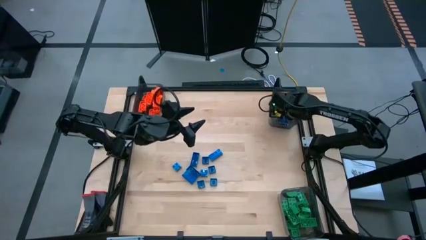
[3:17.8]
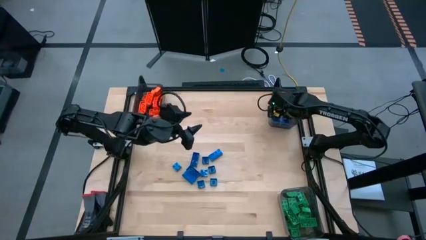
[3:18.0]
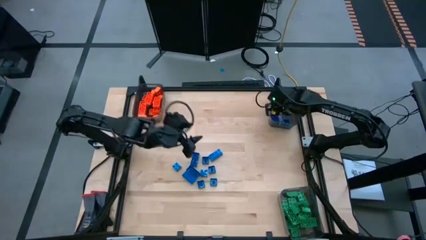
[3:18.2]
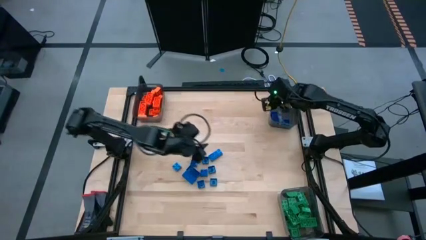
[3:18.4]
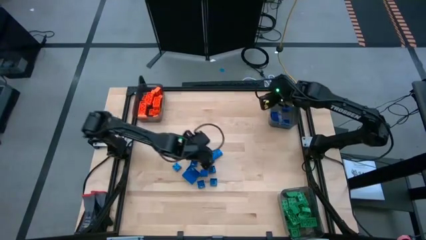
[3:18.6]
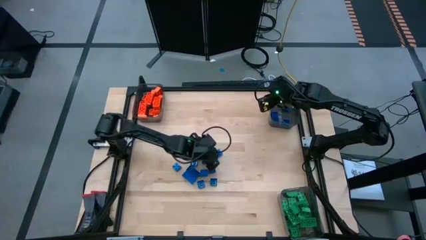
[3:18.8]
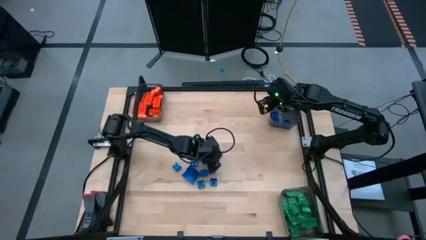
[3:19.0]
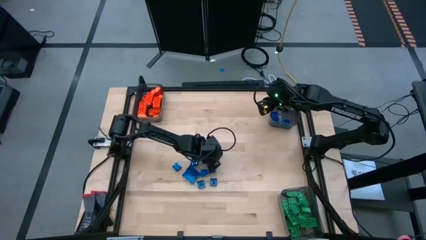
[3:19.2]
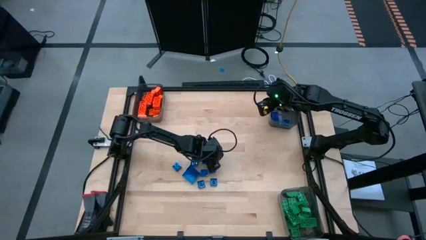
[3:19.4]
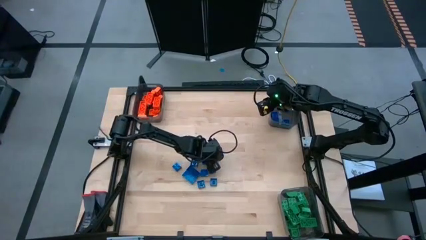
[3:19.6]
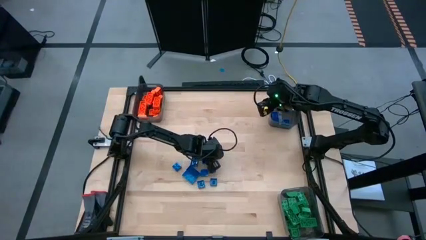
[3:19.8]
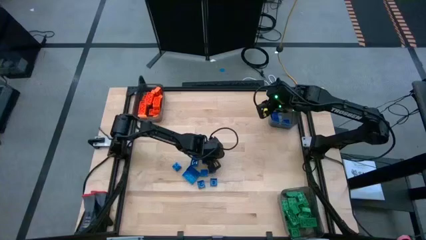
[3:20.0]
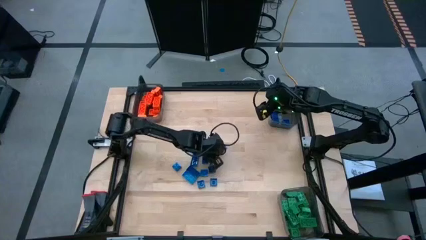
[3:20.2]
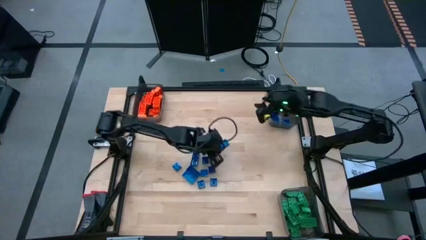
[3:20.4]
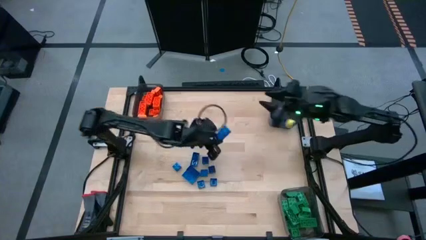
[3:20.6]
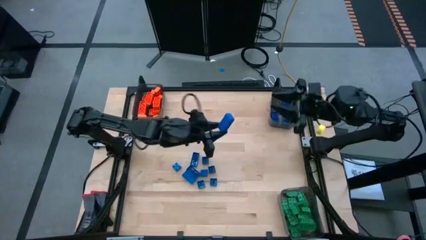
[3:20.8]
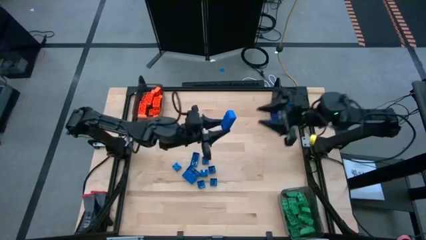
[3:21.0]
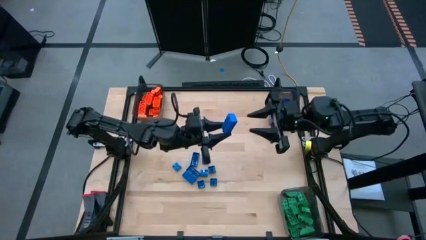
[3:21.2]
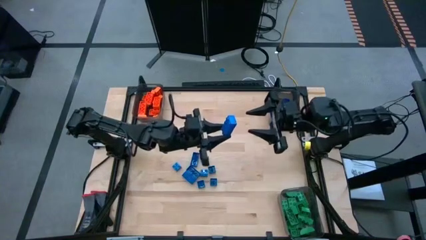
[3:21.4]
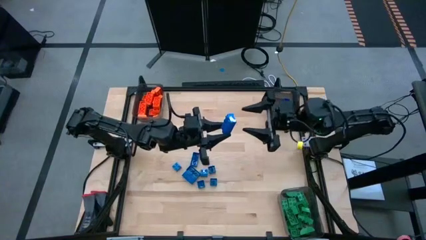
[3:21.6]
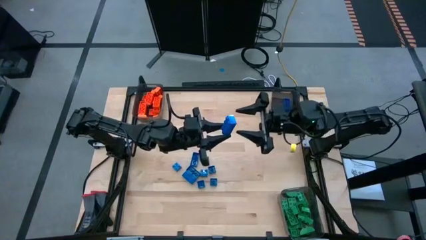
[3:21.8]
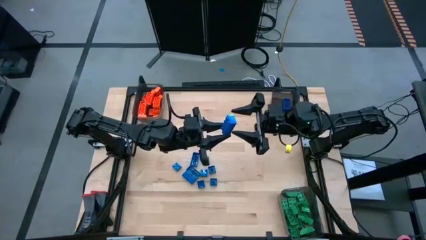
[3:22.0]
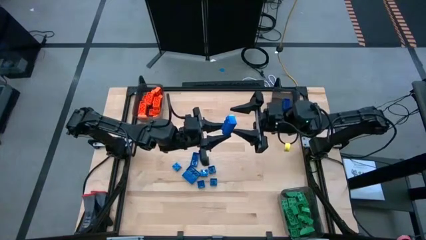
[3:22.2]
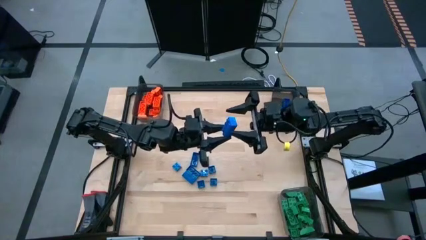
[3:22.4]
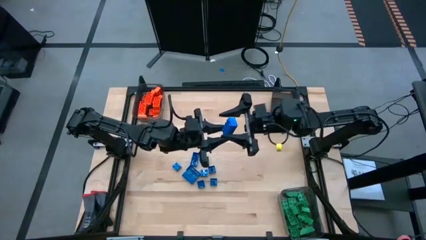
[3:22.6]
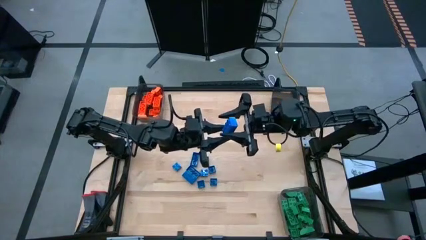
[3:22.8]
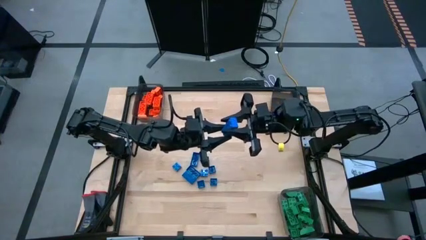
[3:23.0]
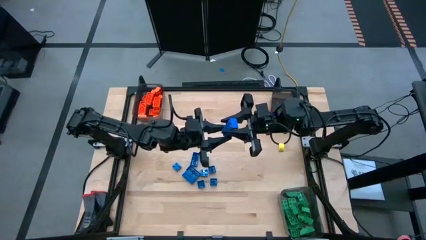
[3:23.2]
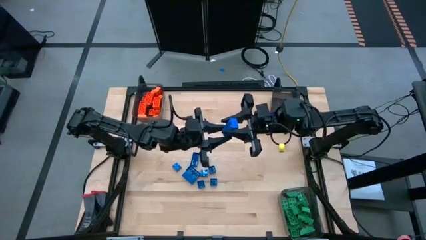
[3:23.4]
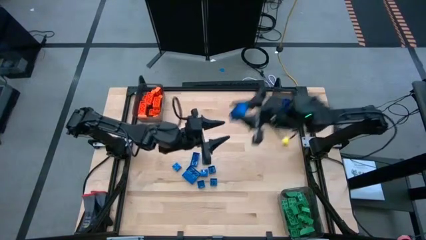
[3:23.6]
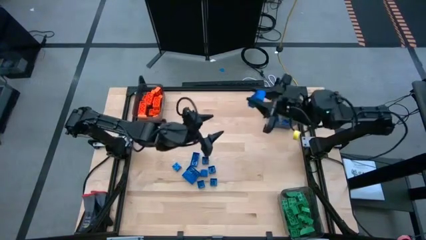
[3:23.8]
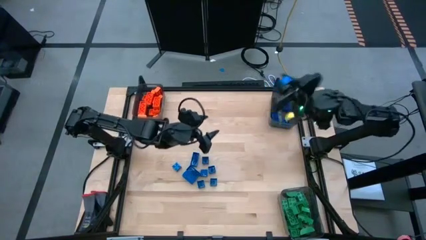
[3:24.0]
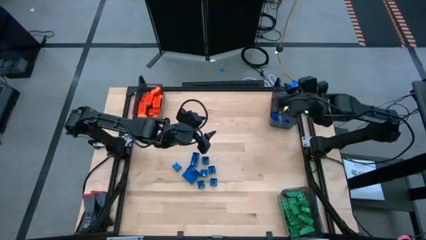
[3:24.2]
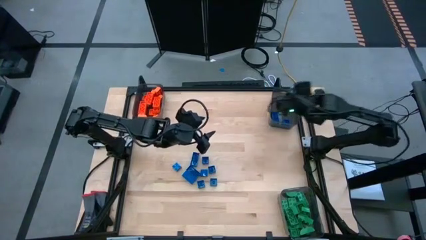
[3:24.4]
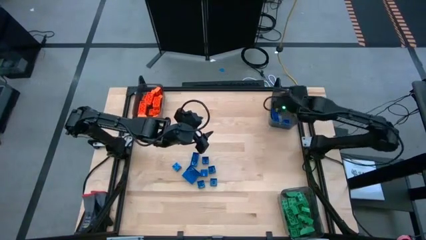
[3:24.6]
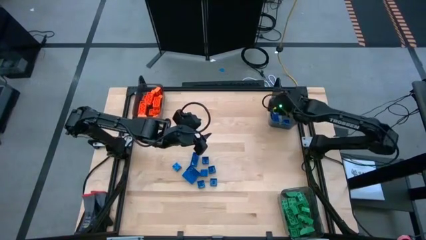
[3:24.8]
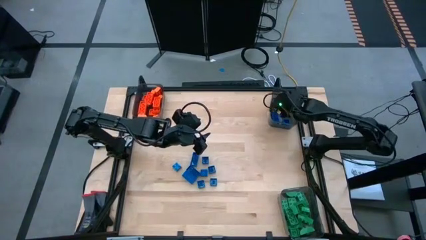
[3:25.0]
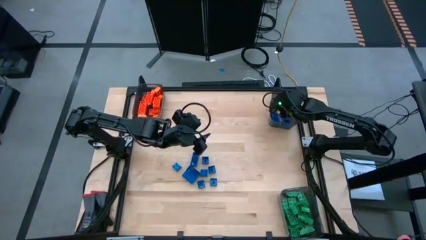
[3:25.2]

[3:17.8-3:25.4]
Task: Sort blocks
Put the blue game piece into the top right black bin

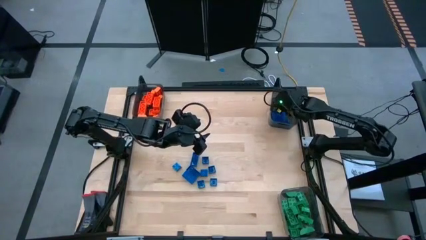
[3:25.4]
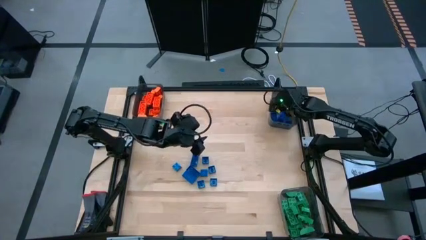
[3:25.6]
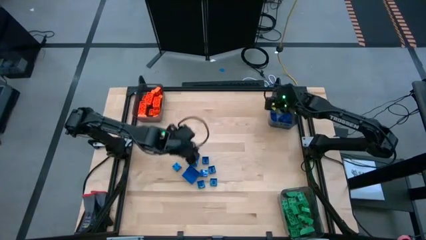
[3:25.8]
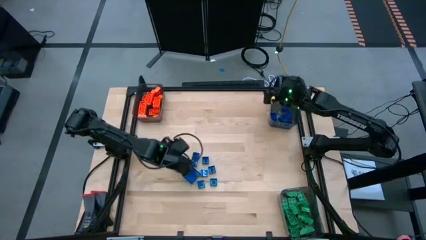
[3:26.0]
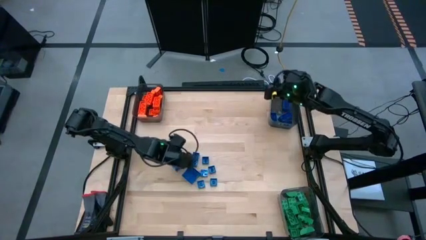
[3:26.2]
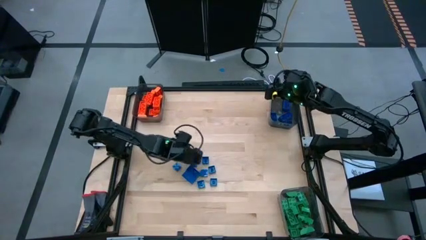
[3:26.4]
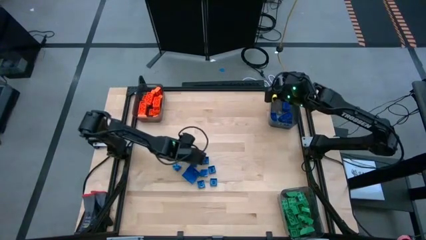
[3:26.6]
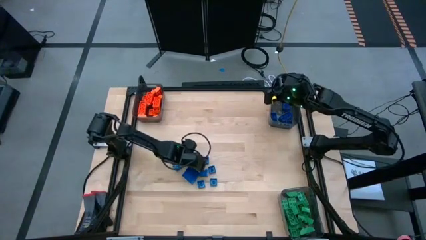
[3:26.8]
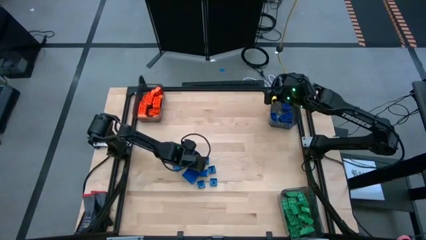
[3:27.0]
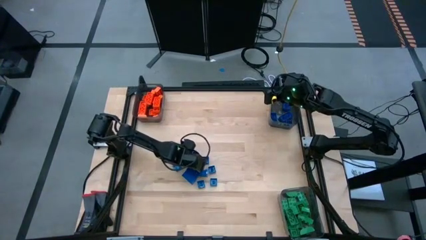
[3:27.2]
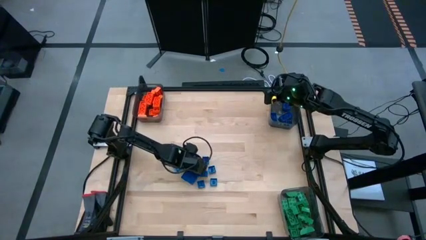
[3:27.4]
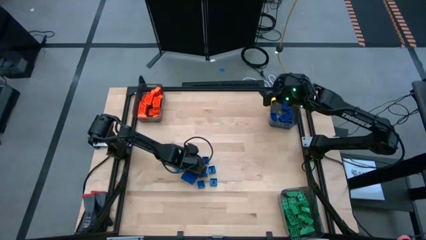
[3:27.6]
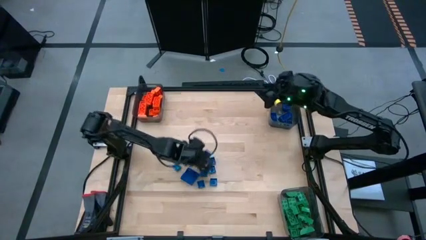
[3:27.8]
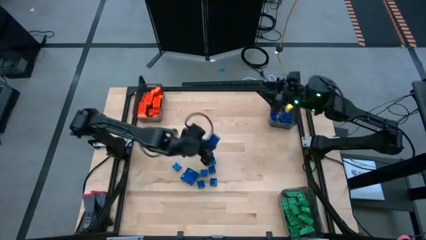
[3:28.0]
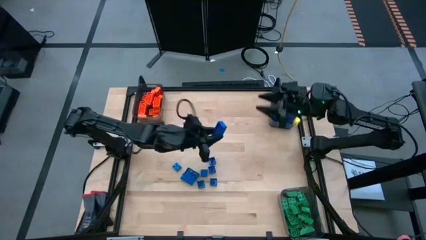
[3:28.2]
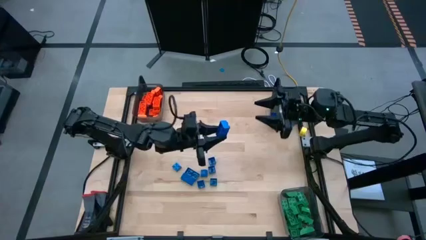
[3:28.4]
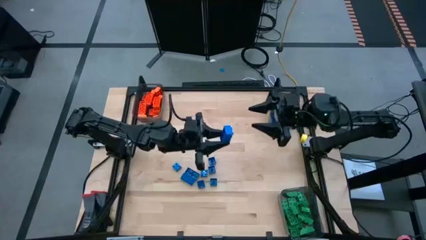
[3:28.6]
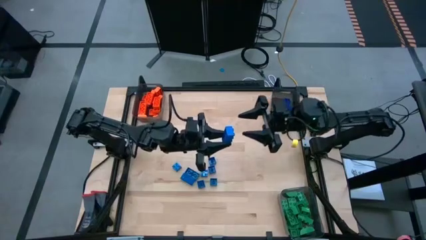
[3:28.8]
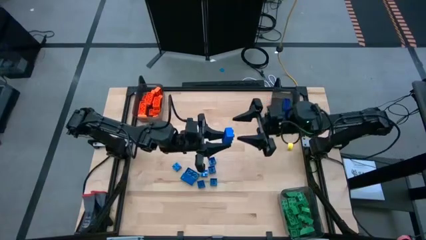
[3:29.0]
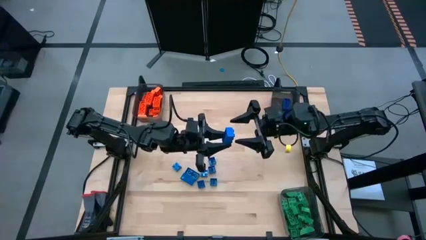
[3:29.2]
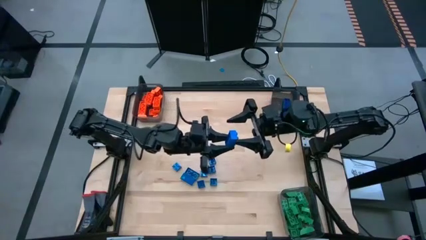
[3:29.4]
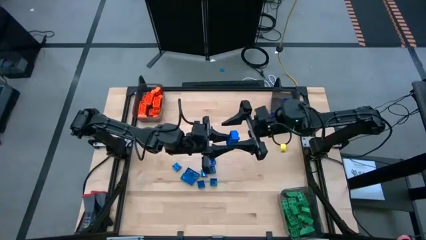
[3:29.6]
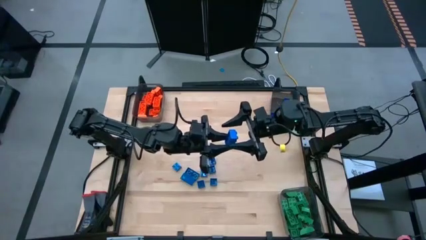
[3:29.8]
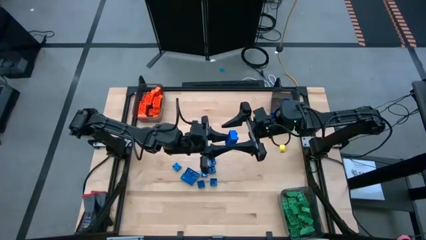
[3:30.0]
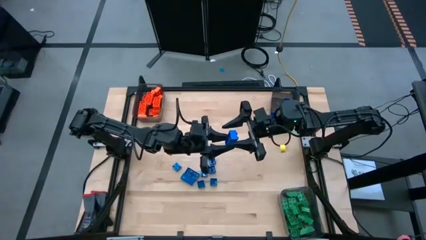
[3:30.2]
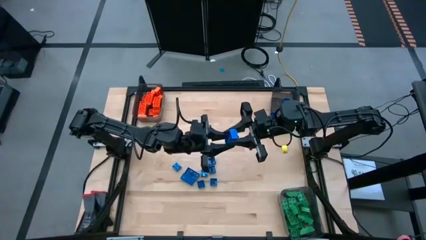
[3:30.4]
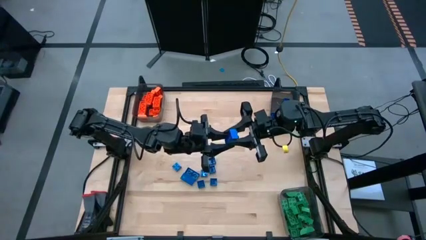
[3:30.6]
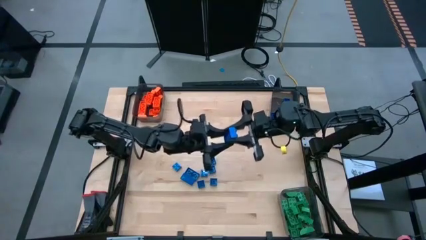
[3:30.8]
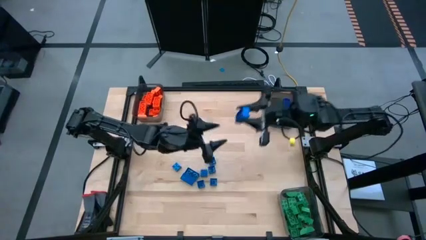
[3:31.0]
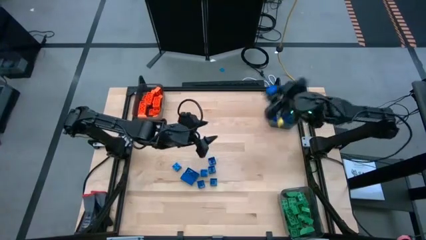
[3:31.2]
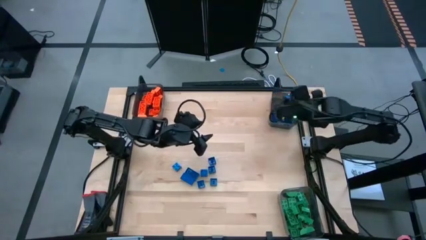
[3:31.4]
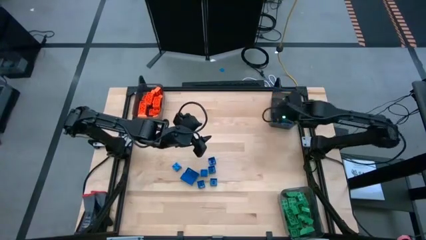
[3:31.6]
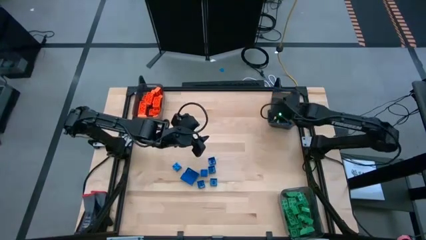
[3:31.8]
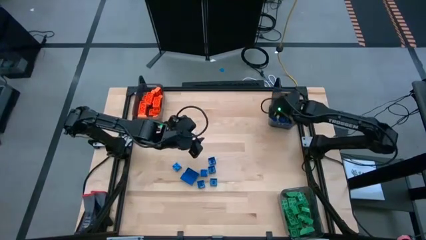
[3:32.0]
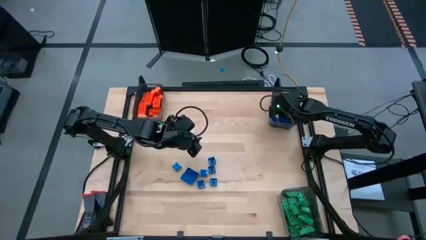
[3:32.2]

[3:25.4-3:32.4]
Put the blue game piece into the top right black bin

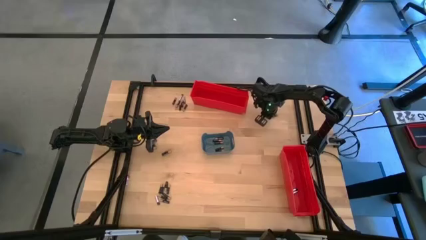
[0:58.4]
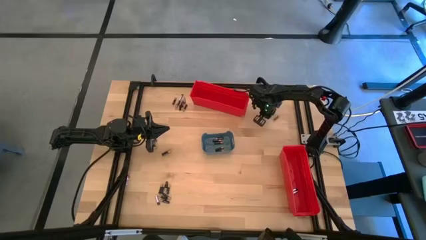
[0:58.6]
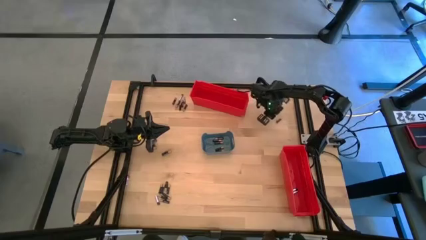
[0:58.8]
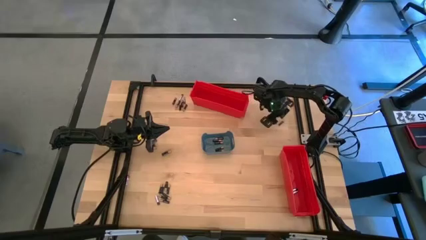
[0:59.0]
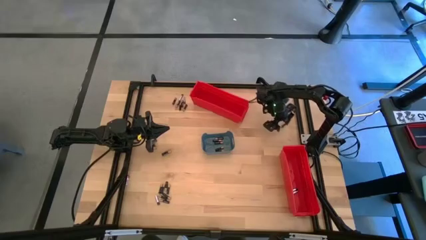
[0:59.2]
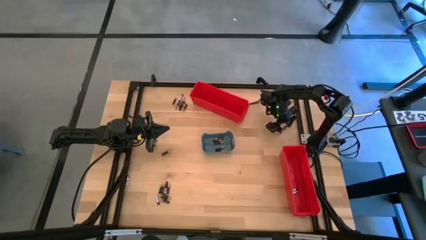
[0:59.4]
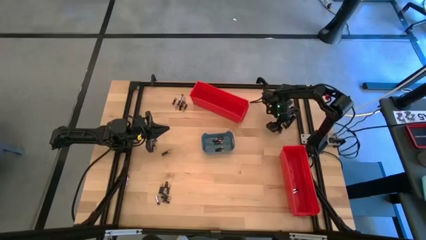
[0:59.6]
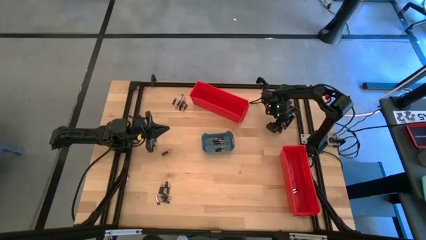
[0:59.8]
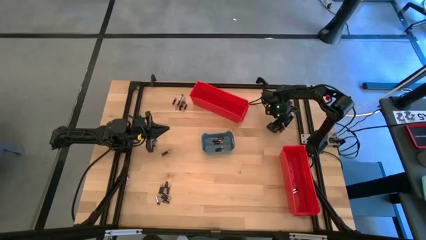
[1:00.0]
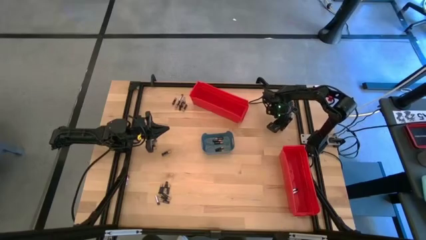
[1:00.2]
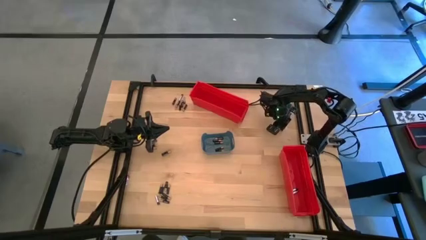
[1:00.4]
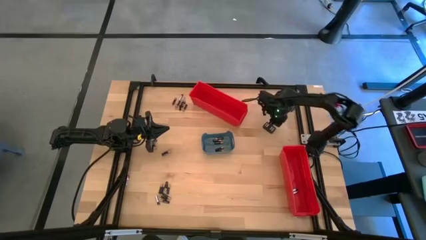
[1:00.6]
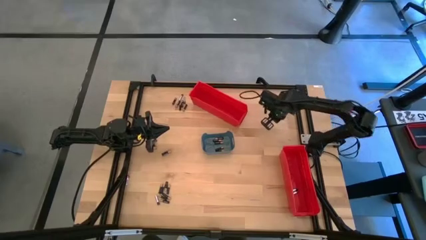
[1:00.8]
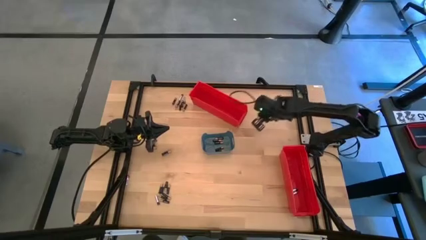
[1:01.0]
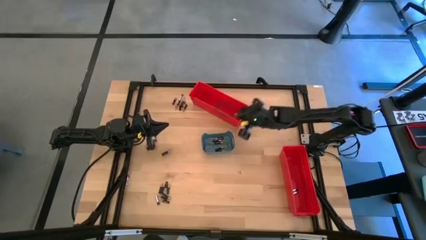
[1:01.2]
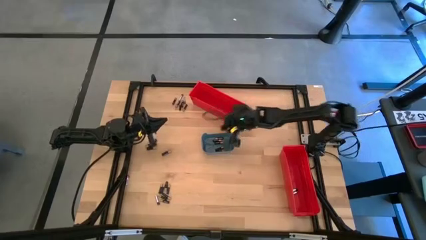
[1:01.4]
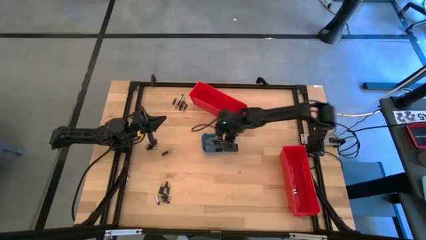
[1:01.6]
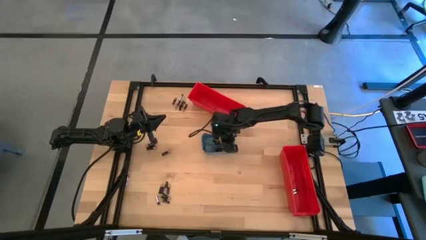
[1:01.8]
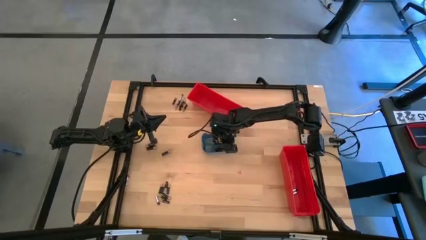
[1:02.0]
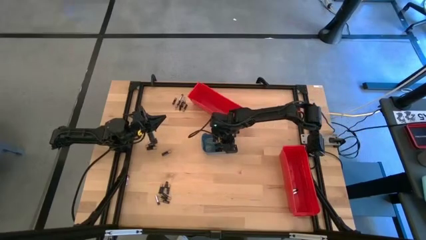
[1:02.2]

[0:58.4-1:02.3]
Task: Sort batteries
Put the black battery into the blue bin
